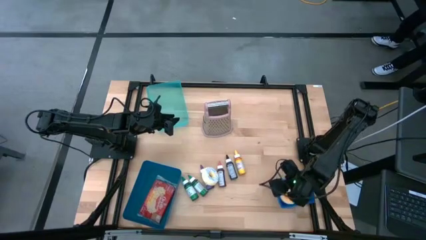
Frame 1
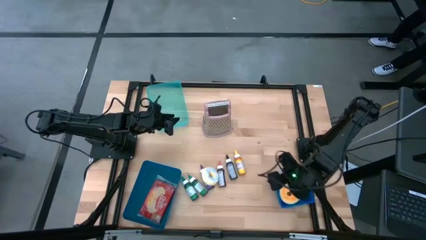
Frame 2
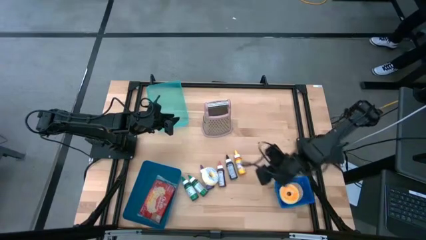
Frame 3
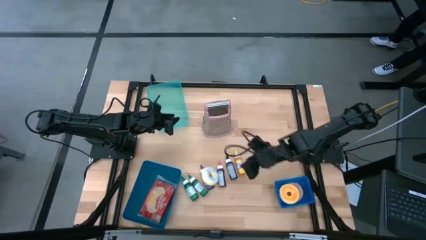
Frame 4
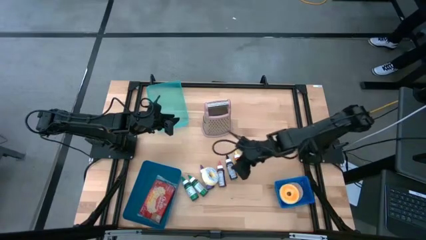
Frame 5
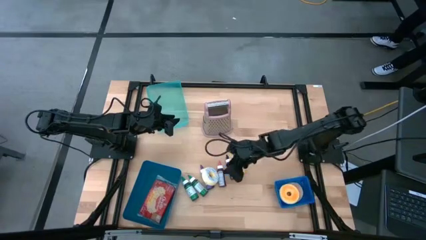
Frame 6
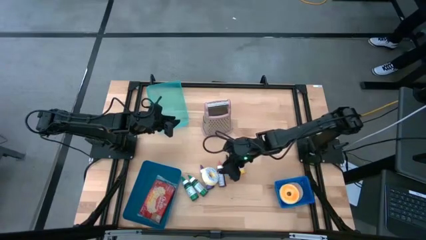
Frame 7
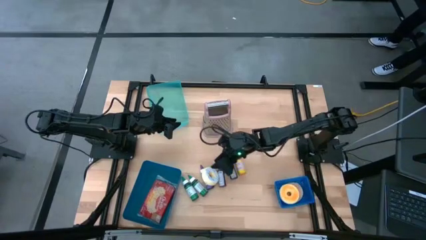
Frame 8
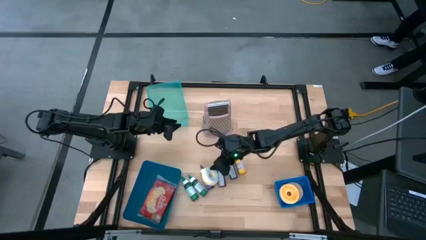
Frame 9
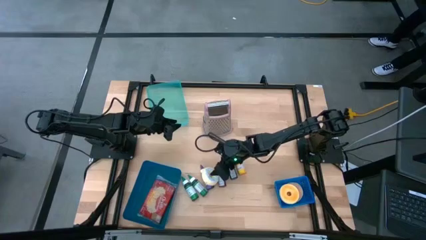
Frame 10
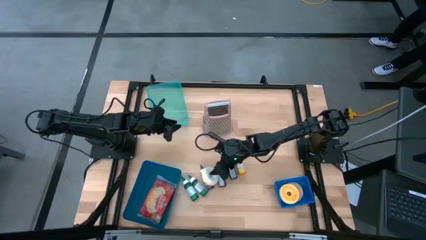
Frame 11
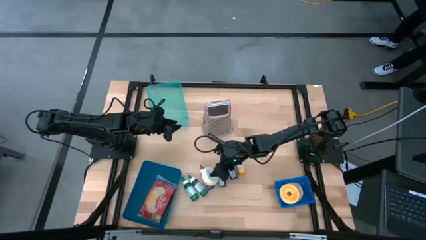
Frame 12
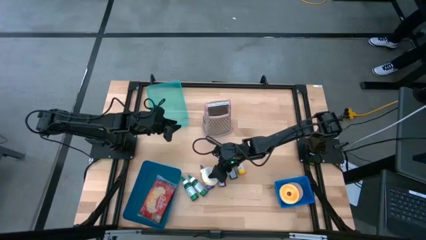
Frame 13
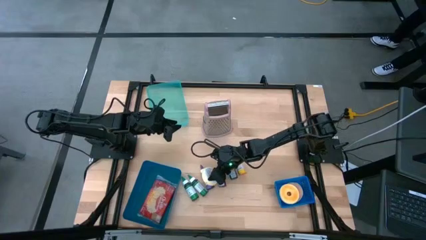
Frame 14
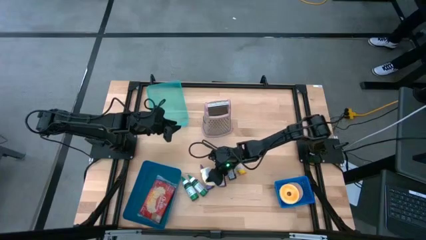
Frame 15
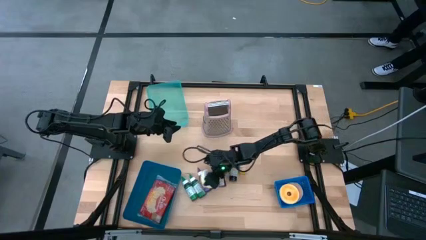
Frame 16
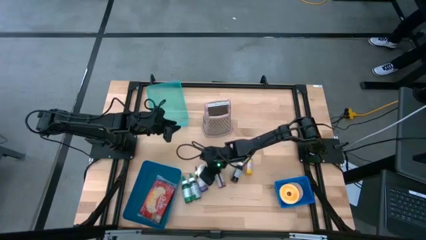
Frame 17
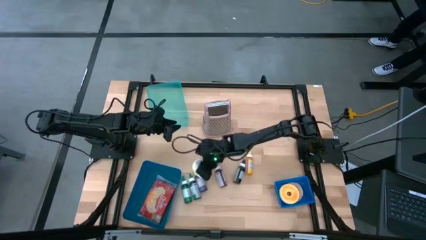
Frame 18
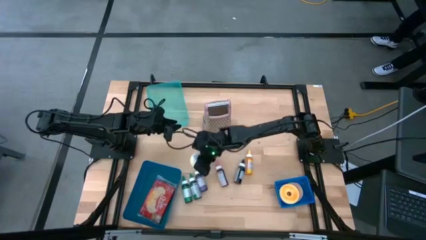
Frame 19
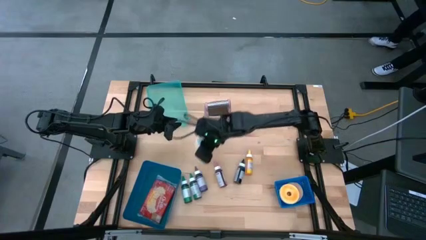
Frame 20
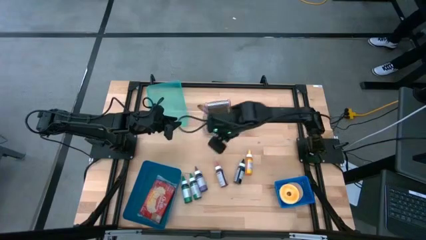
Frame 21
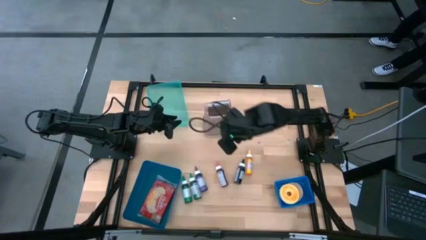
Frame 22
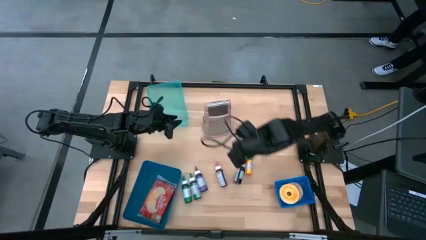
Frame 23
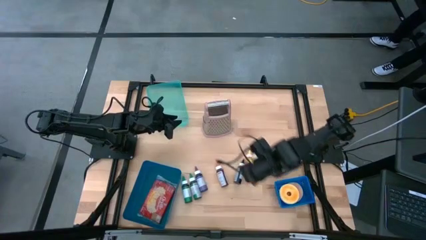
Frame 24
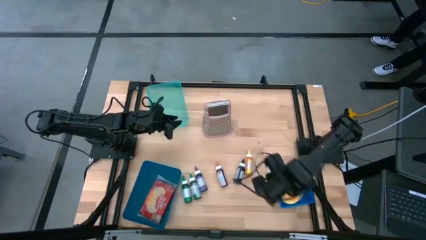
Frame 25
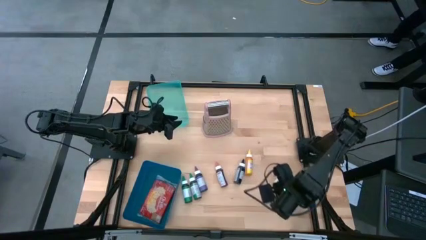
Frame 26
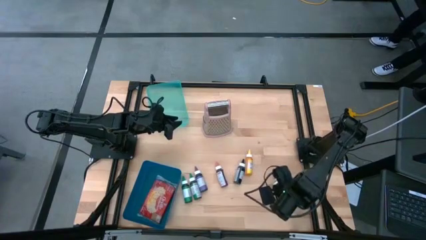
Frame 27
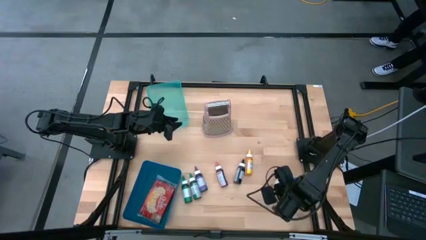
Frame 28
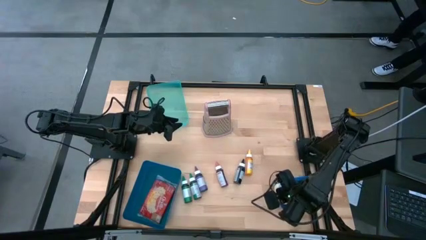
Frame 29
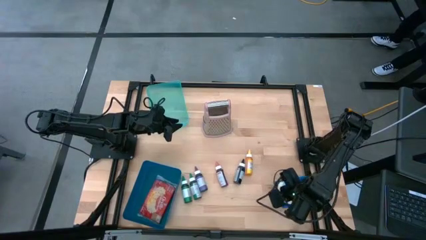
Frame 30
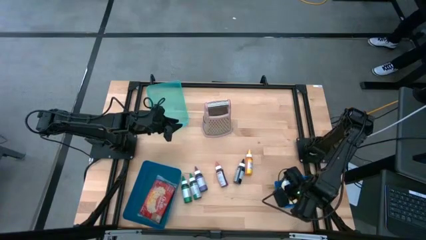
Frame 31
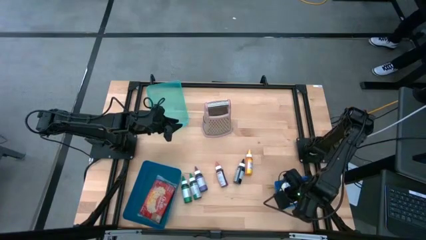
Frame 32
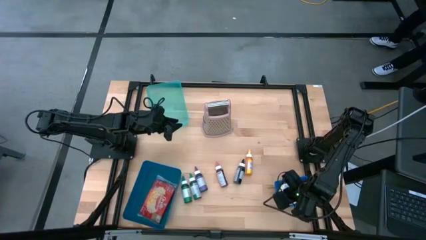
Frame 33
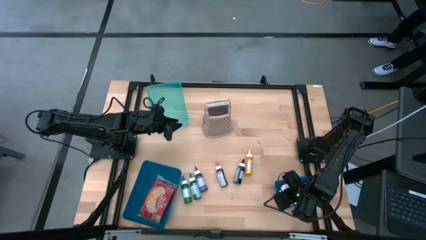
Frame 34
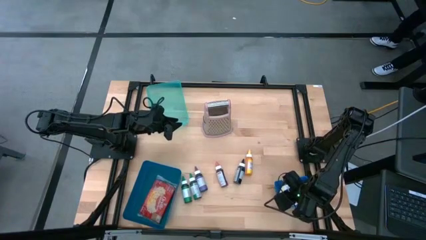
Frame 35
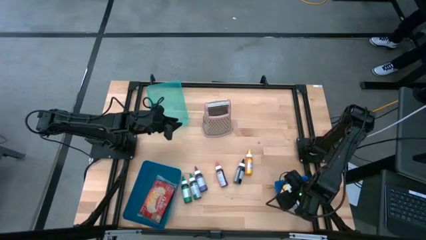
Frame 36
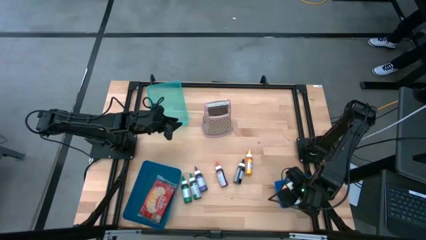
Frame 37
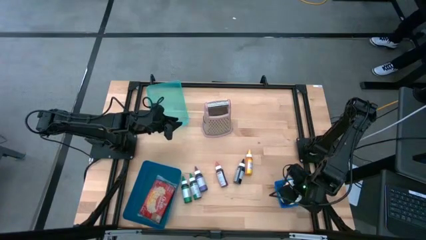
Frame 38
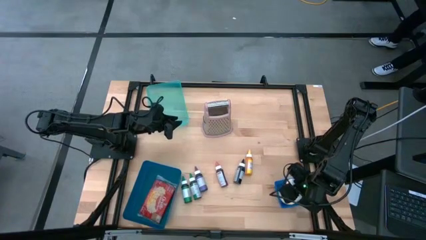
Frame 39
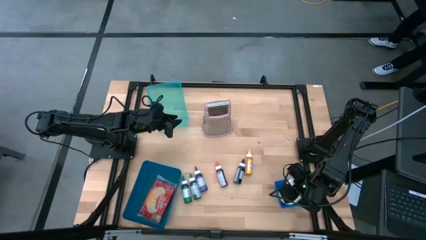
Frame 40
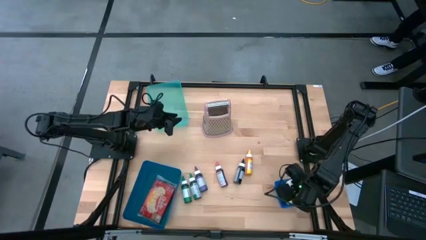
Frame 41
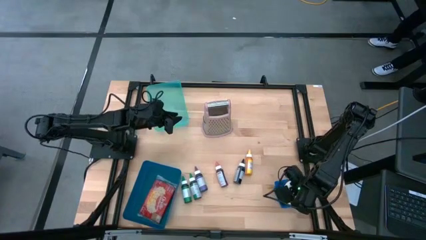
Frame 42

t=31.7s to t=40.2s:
Put the donut into the blue bin

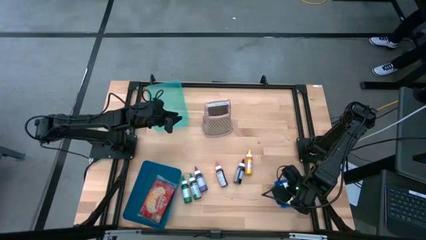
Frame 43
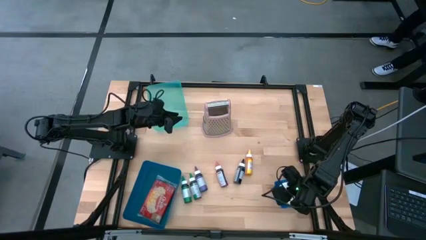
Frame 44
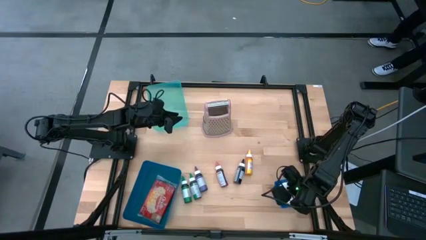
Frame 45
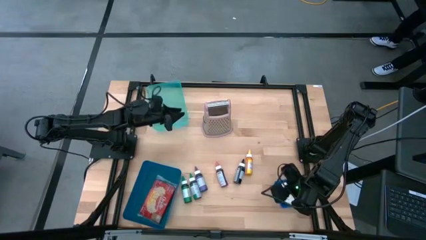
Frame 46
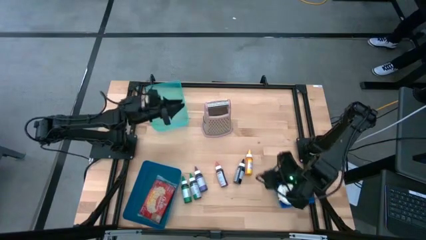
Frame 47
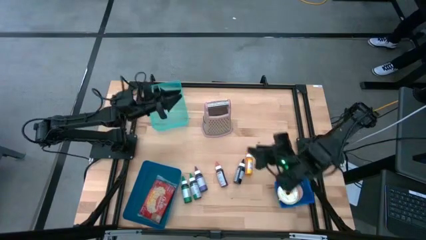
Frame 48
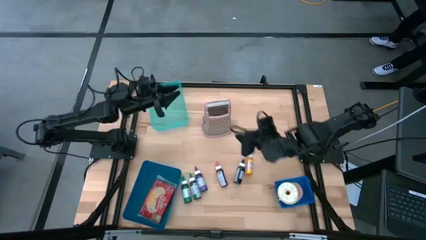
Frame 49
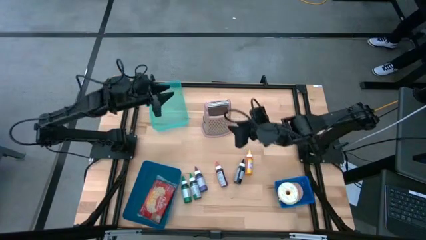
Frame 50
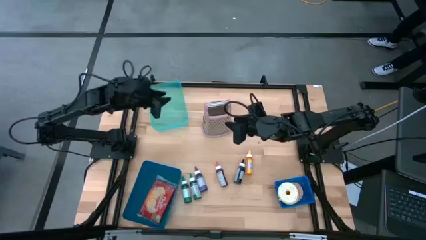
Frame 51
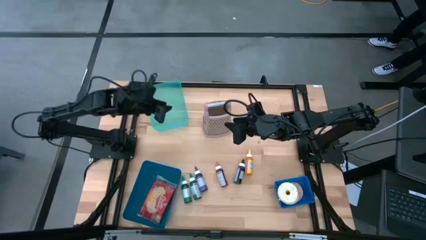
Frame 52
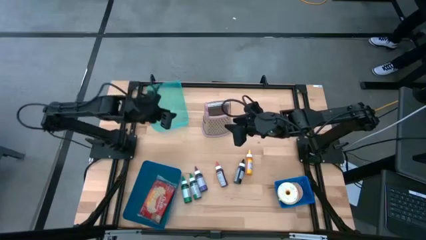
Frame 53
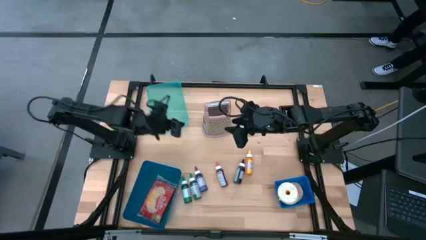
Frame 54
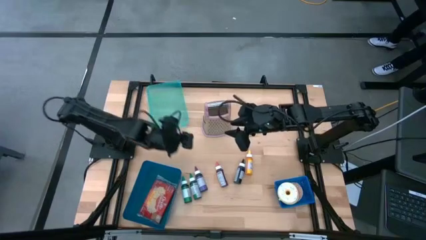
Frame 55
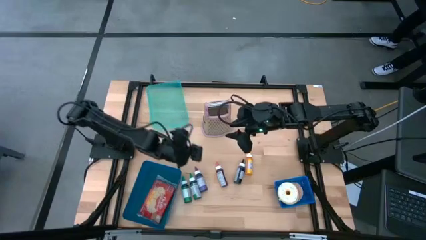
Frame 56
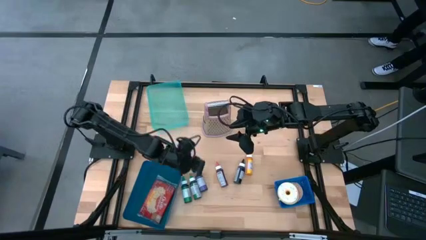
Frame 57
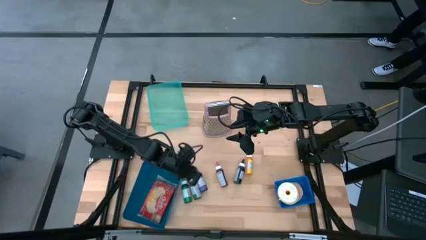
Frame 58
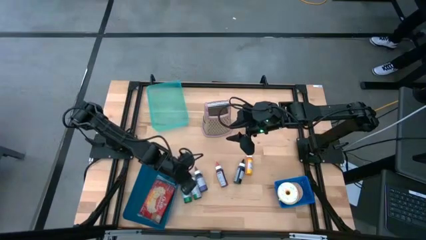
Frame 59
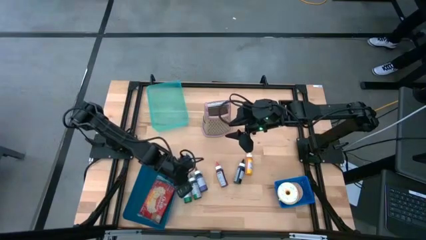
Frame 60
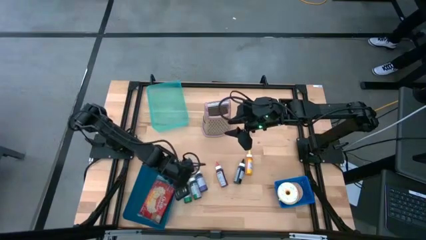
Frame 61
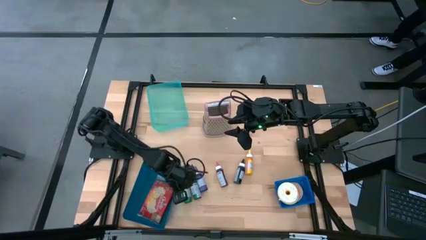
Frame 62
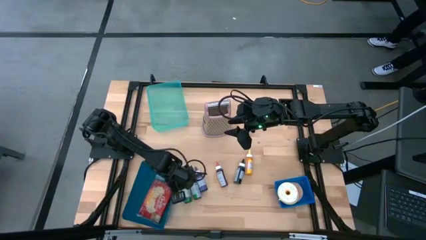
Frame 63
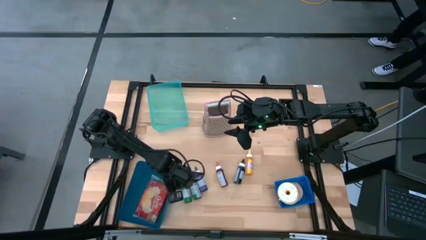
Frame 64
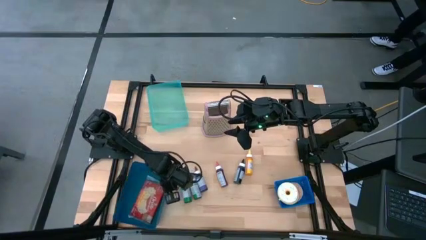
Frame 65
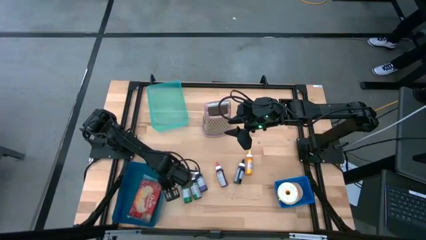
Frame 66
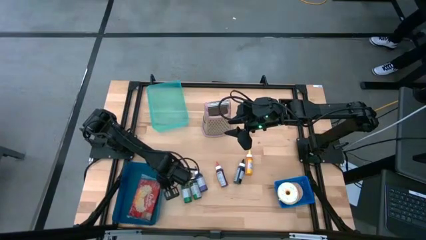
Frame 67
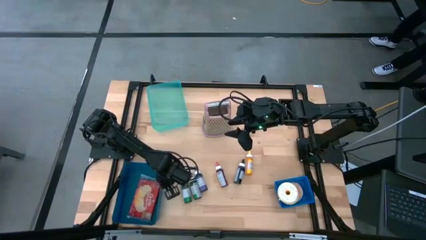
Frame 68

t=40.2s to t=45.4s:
Adjust the dark blue bin

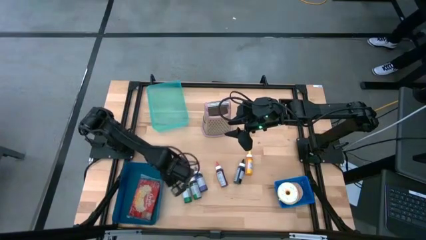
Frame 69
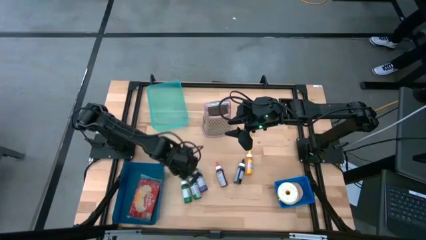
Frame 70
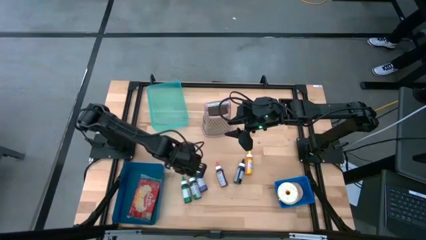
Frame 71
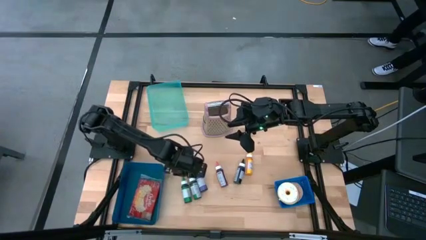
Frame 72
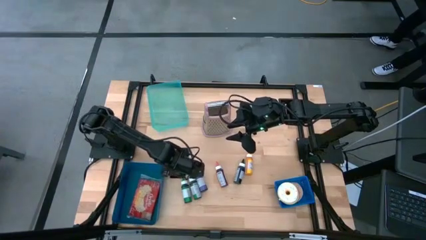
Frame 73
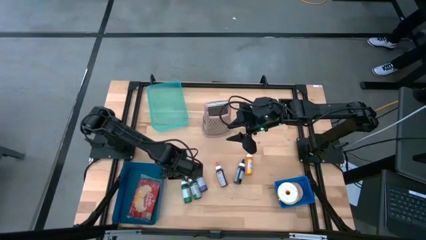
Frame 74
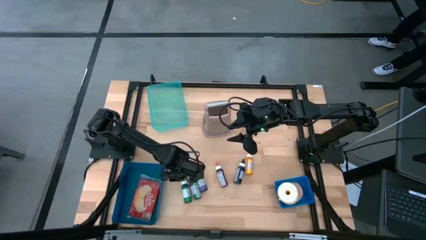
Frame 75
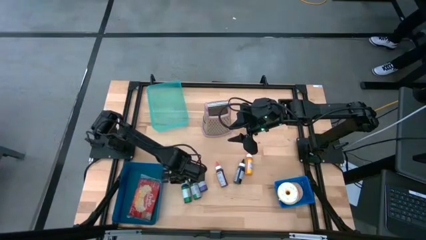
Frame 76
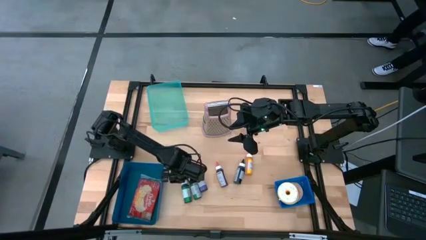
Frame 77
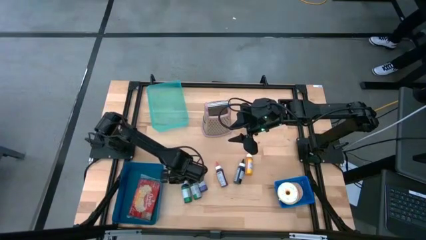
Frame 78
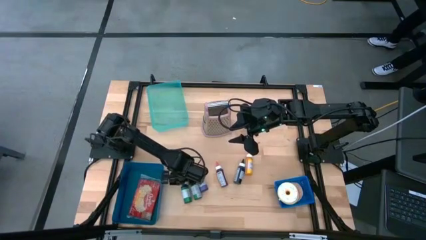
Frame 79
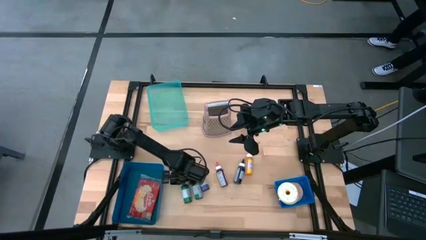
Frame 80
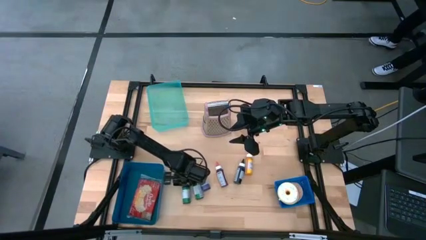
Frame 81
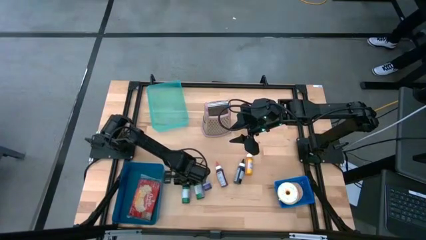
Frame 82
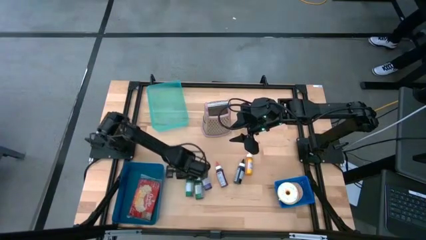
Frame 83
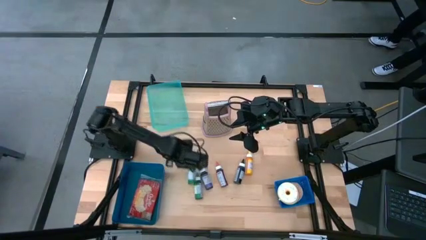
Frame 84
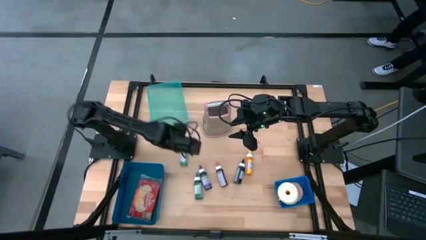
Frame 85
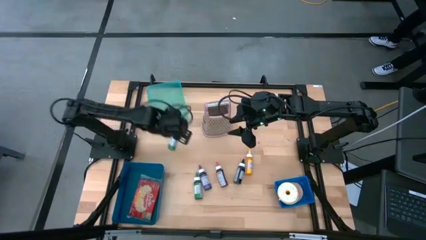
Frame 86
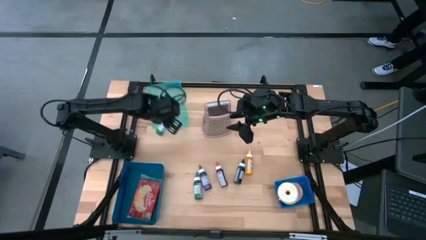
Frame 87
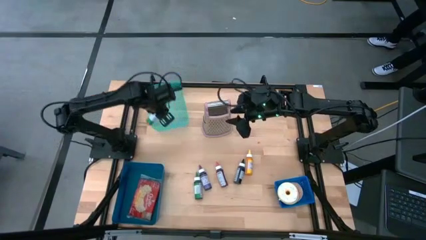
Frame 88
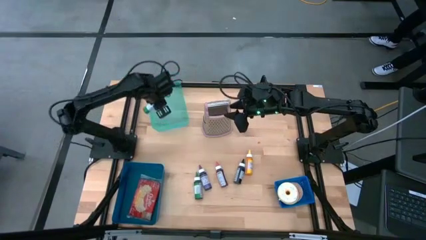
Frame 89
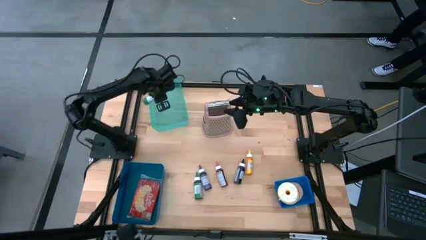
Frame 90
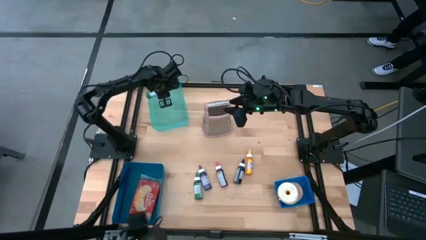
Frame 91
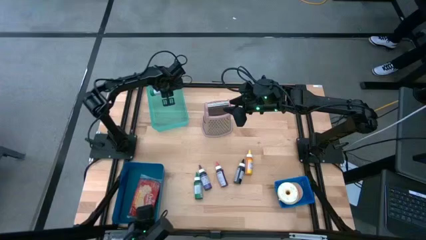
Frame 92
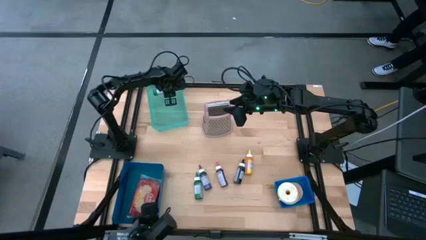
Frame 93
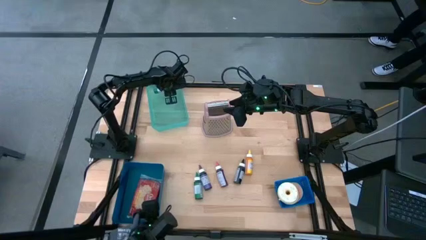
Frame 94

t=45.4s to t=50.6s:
Put the left green food coloring into the green bin
